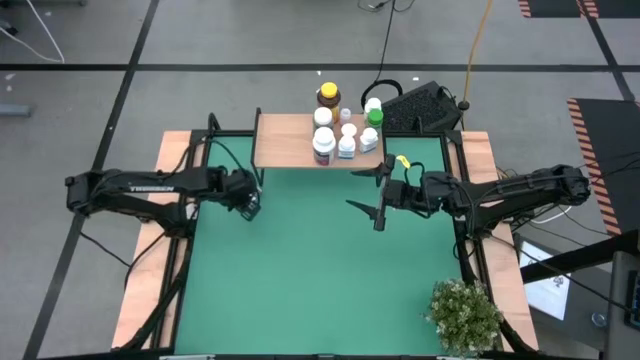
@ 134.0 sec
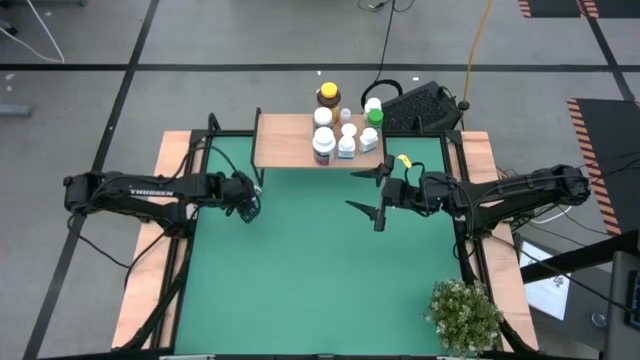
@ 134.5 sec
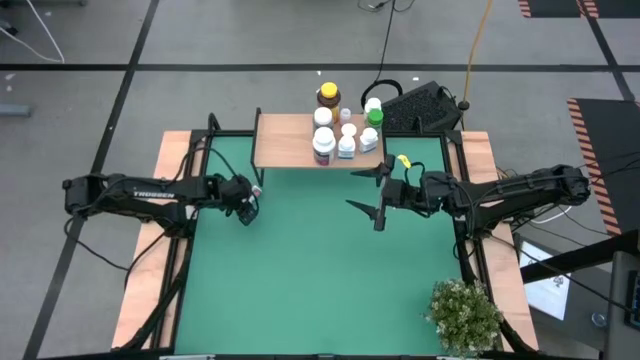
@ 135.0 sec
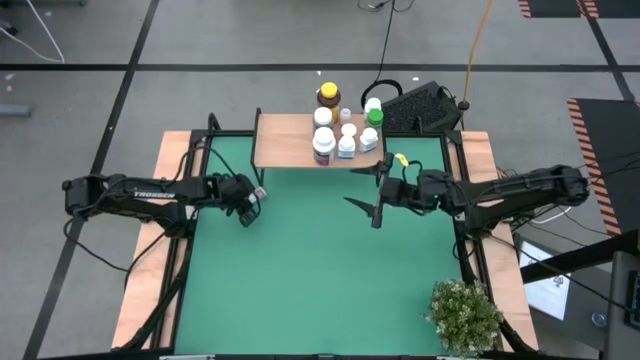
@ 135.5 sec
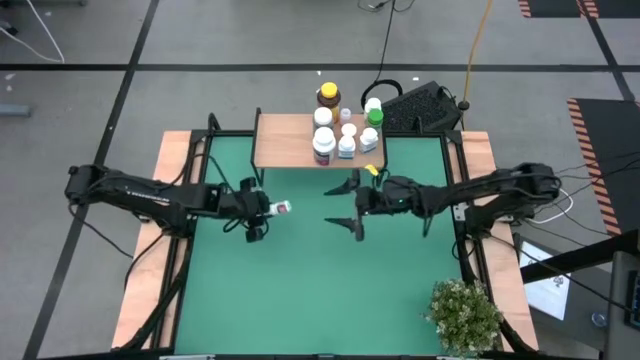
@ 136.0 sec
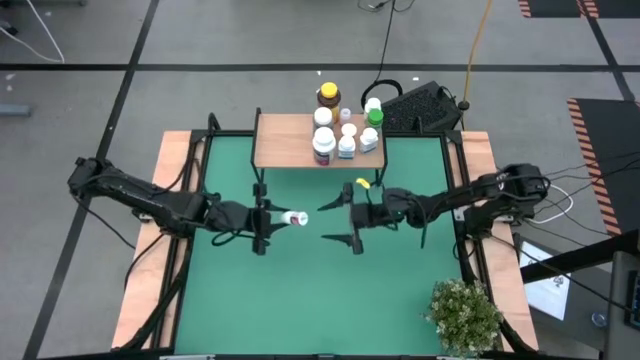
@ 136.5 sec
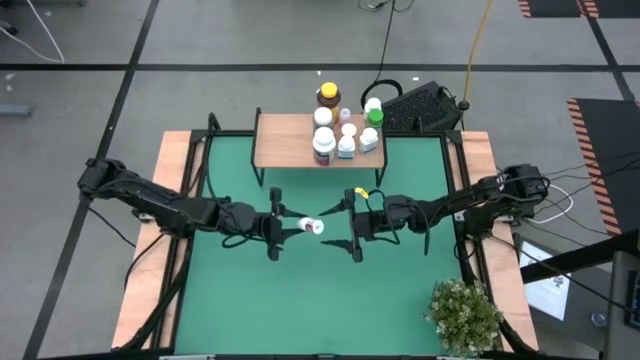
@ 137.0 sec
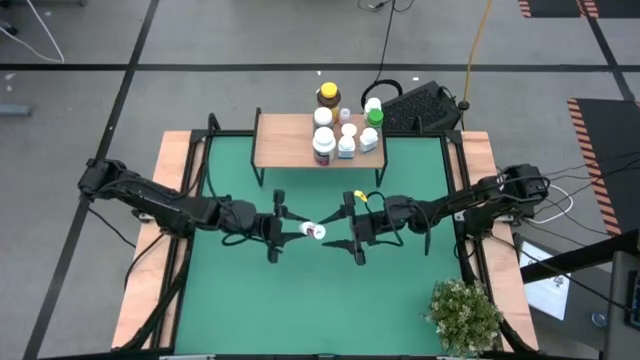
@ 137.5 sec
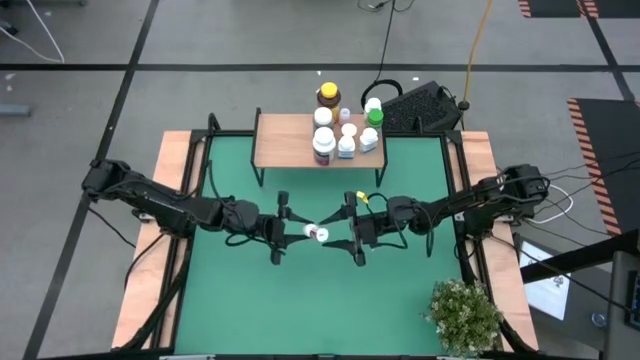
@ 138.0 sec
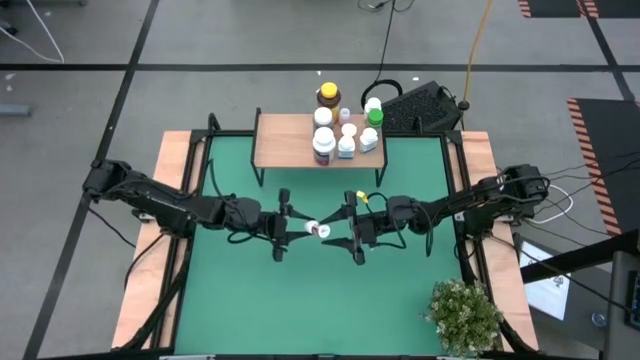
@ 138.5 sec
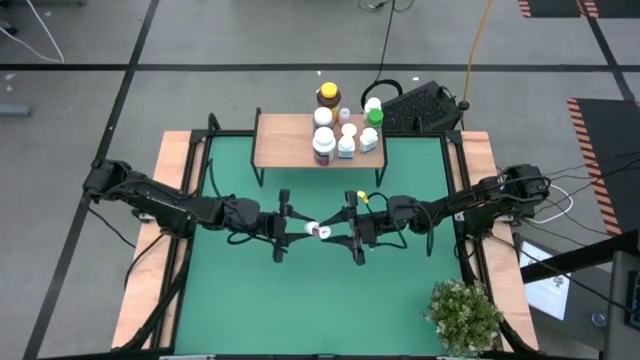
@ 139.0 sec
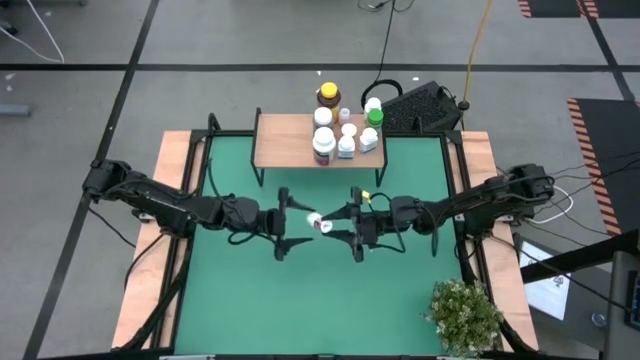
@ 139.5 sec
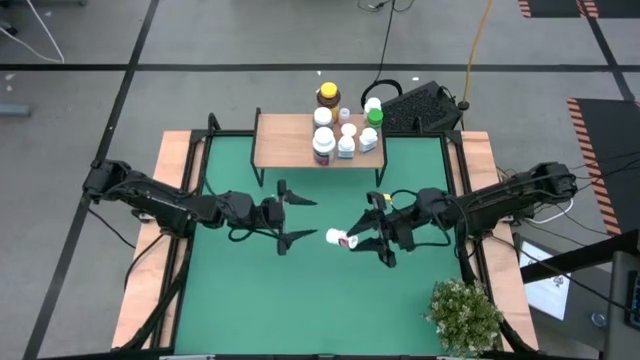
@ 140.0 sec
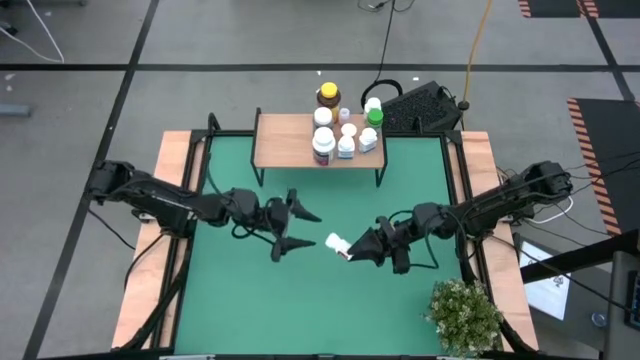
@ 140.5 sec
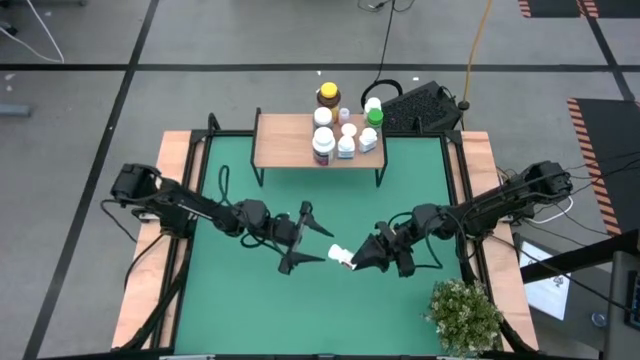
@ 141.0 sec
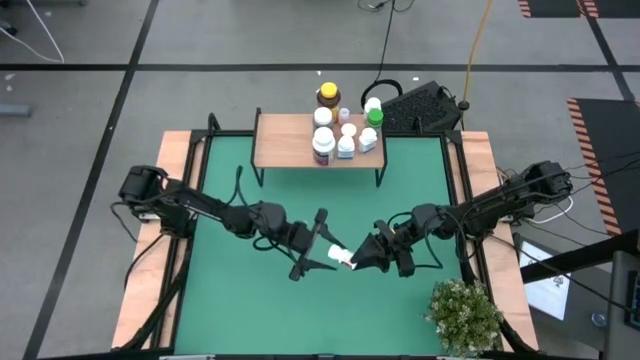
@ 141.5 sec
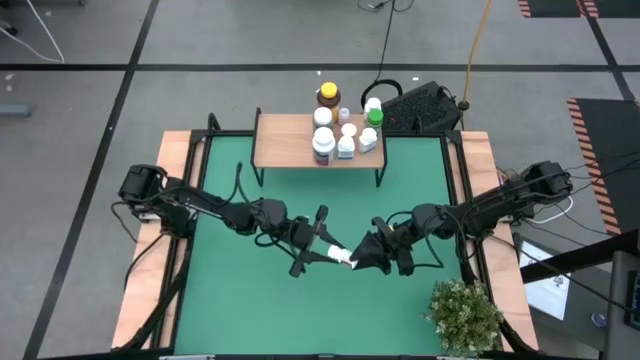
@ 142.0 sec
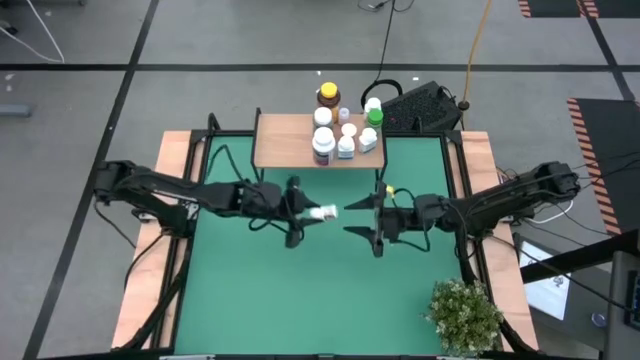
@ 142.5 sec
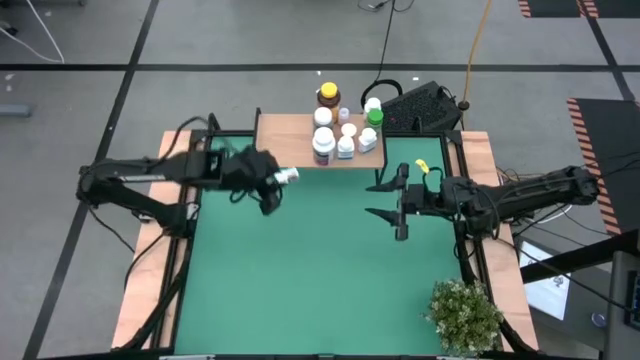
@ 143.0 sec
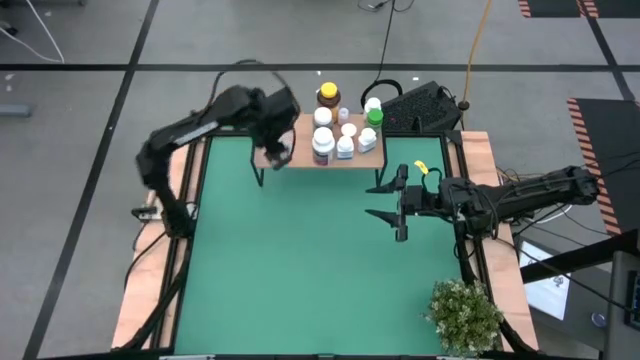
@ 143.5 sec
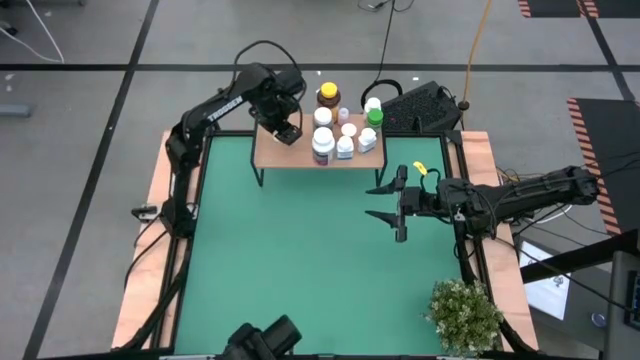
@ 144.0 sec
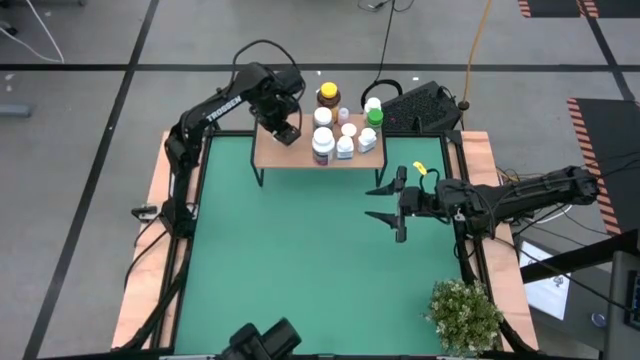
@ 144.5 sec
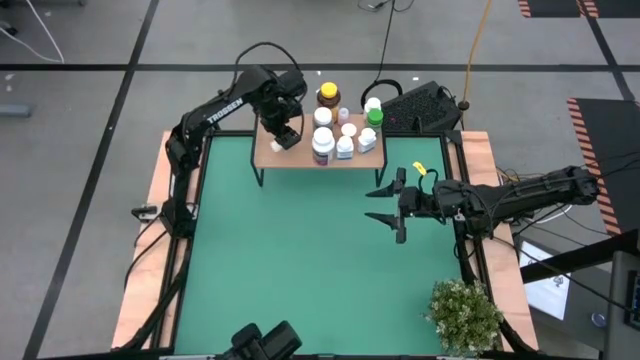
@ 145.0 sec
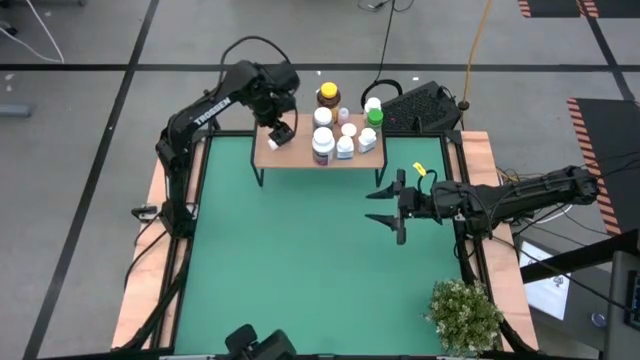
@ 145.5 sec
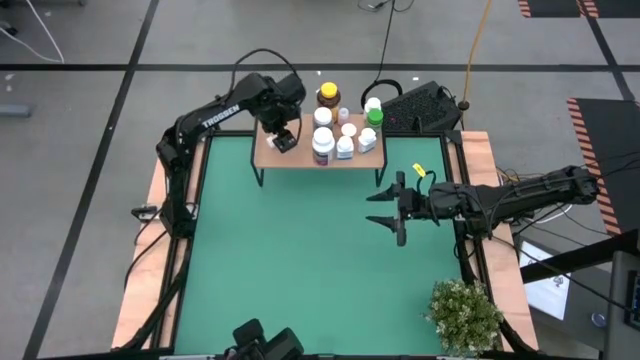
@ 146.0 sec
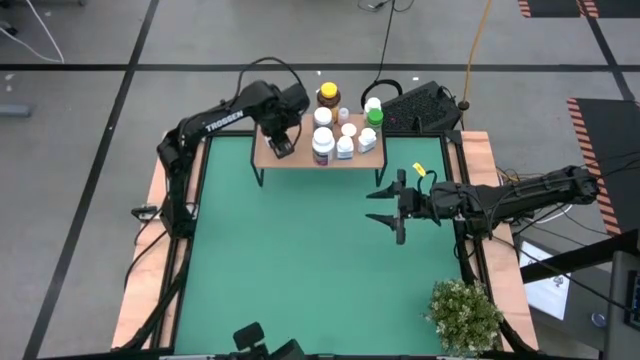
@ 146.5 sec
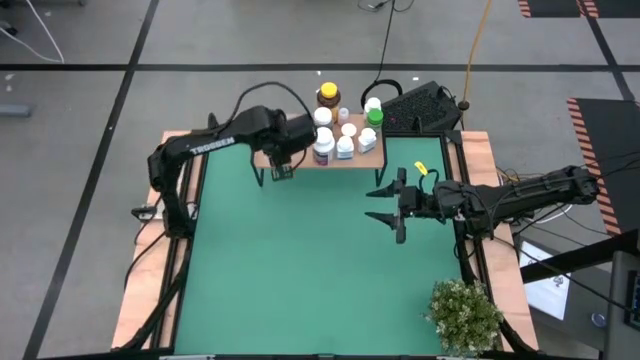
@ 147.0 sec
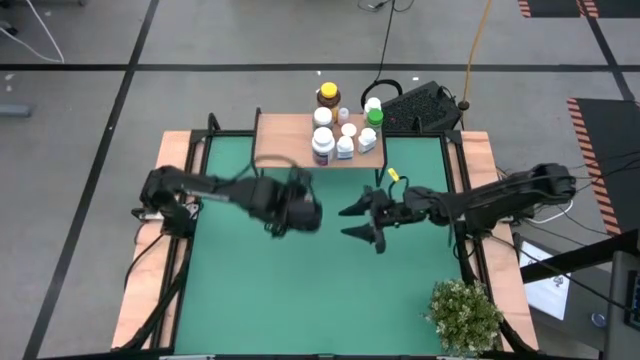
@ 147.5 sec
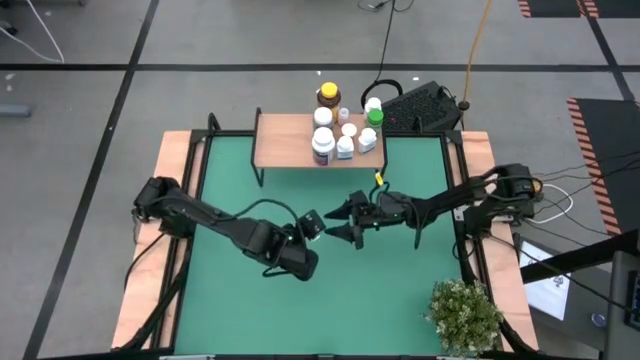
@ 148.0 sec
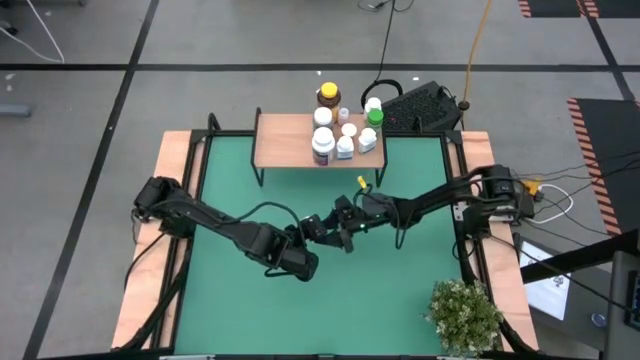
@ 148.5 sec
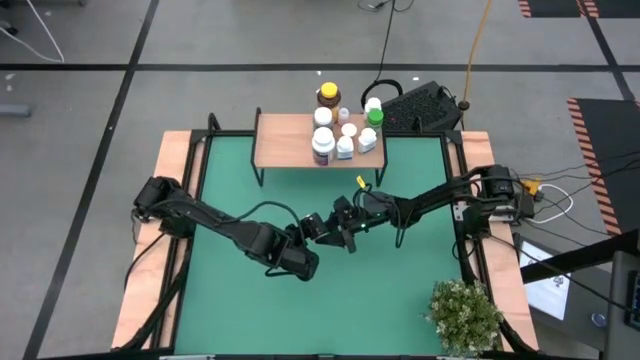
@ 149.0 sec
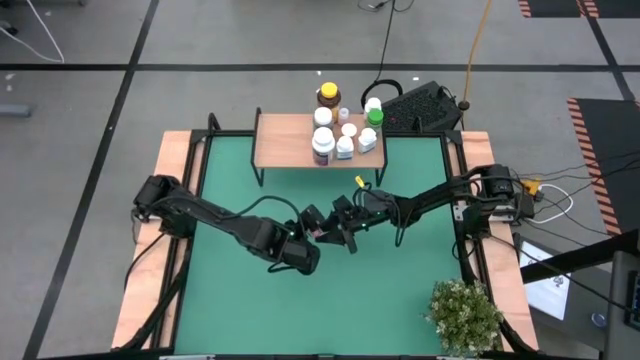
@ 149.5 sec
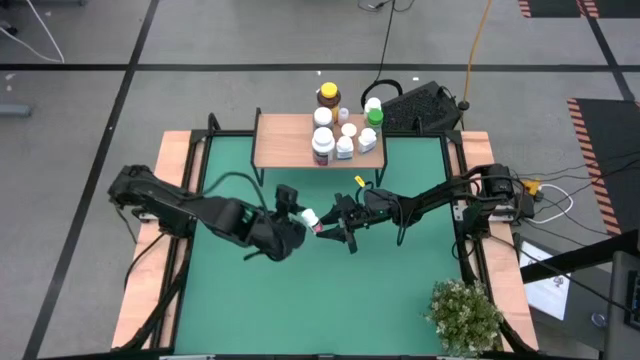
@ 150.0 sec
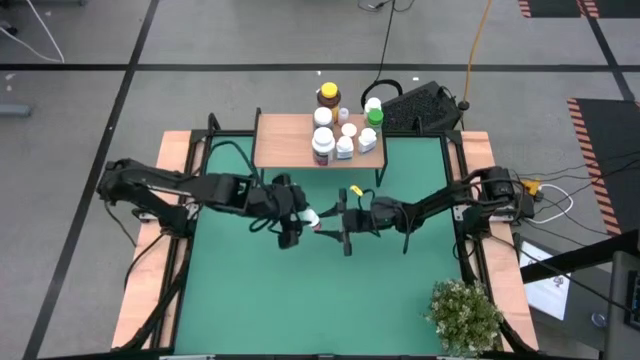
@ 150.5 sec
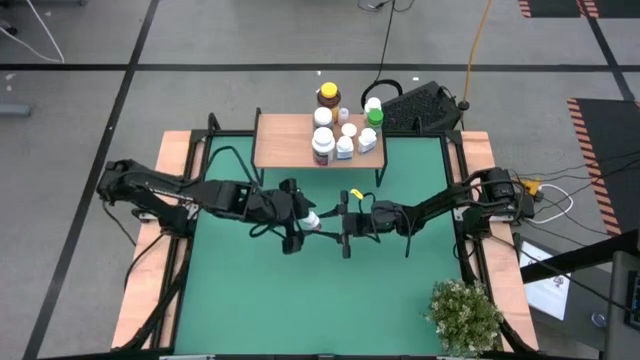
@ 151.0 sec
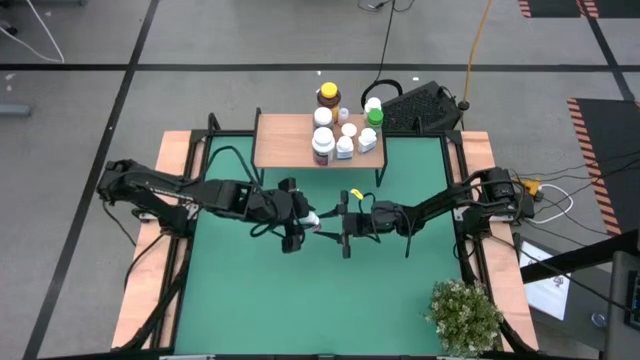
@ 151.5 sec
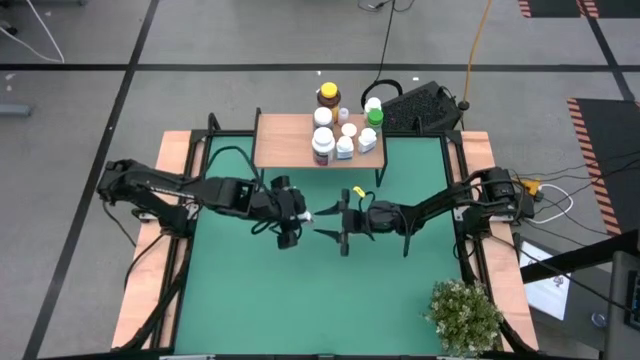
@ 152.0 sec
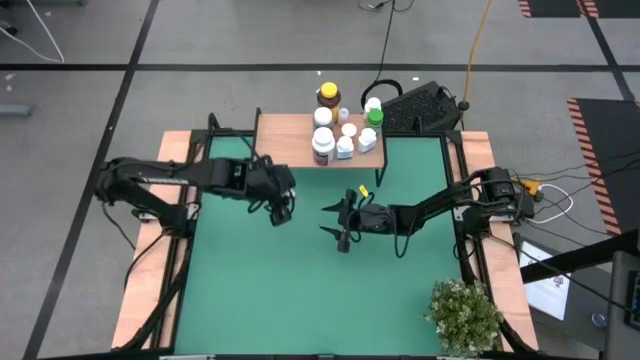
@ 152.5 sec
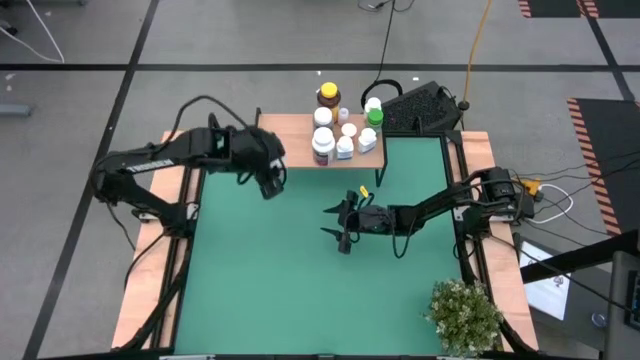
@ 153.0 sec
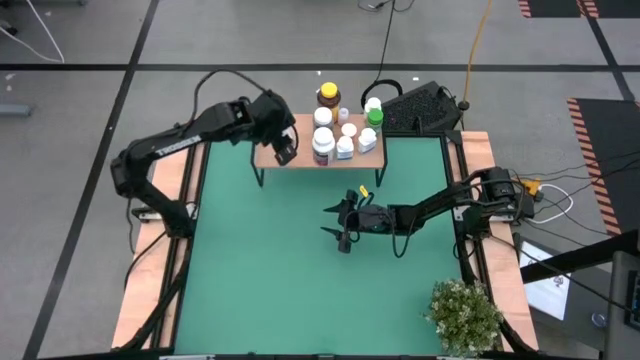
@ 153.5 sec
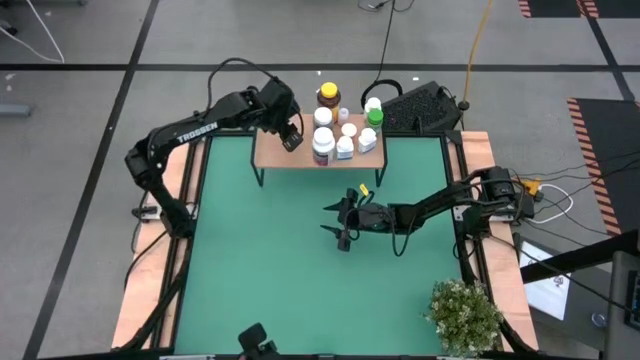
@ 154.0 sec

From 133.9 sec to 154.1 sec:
Task: Pick and place medicine bottles onto shelf by color
Put the small white medicine bottle on the shelf
